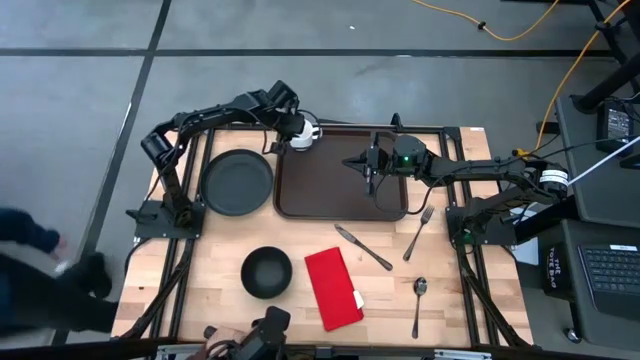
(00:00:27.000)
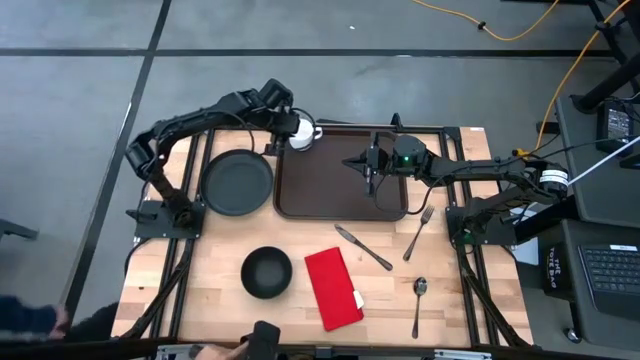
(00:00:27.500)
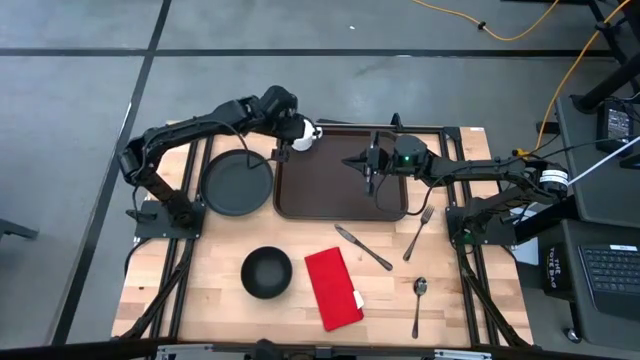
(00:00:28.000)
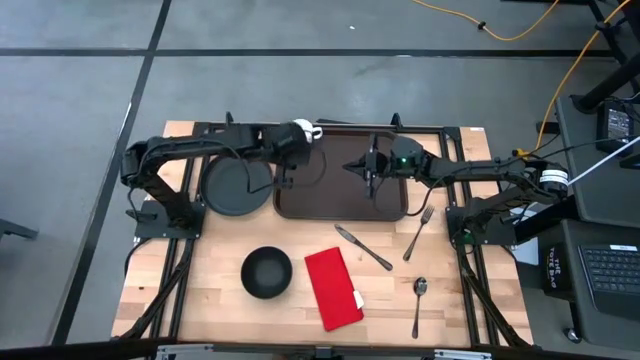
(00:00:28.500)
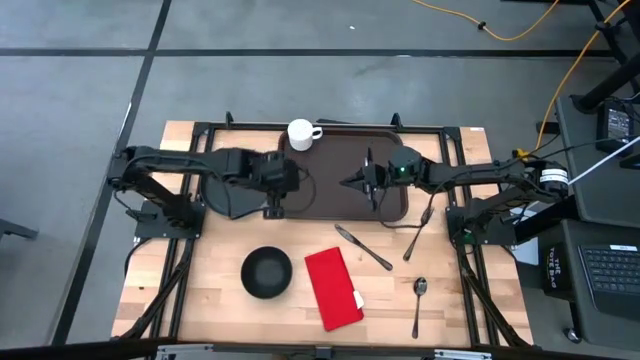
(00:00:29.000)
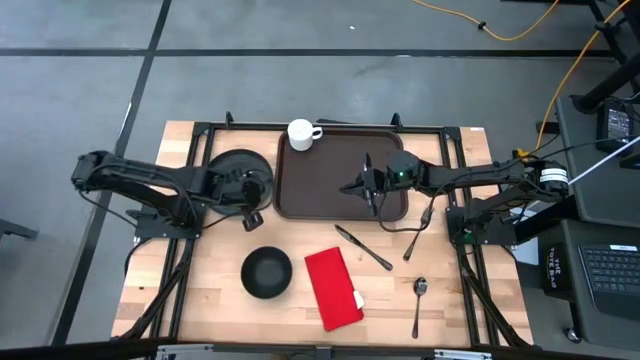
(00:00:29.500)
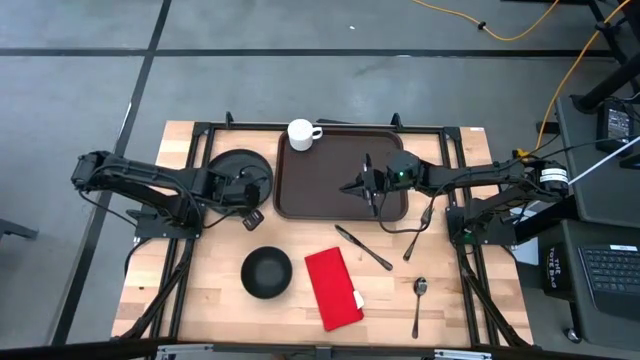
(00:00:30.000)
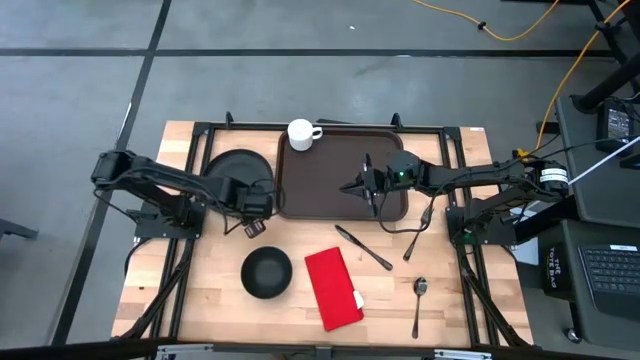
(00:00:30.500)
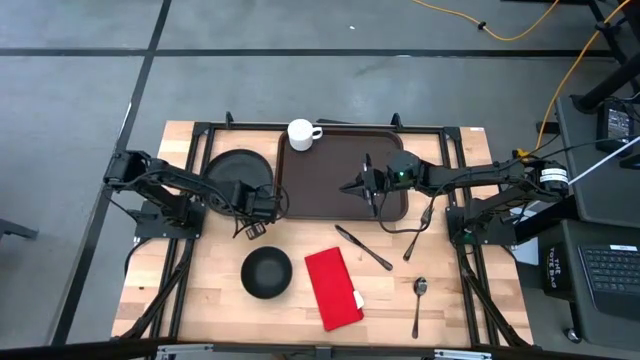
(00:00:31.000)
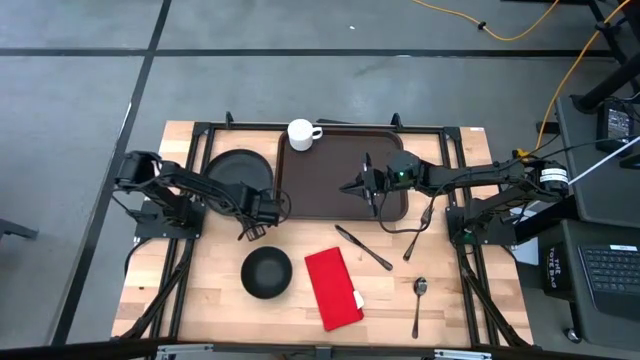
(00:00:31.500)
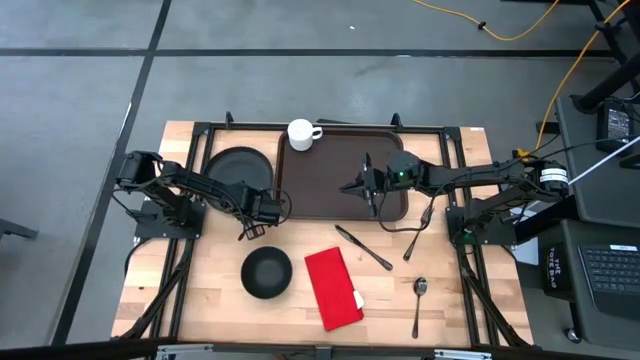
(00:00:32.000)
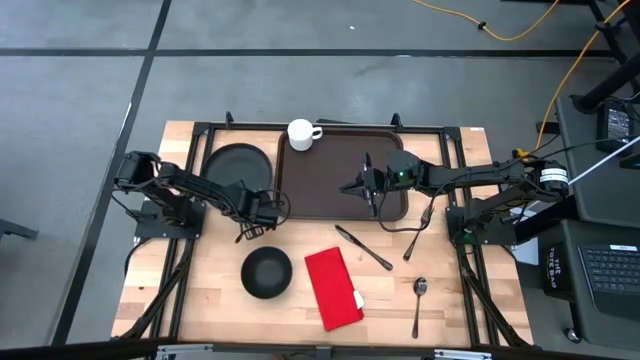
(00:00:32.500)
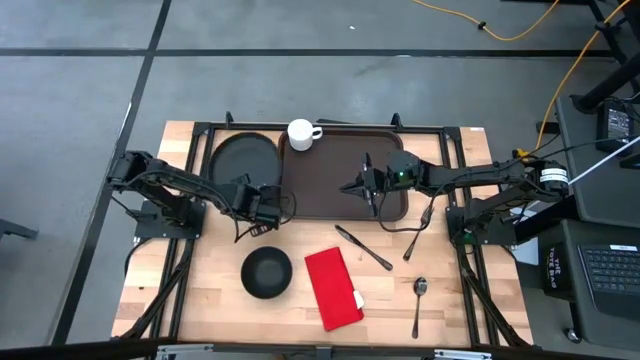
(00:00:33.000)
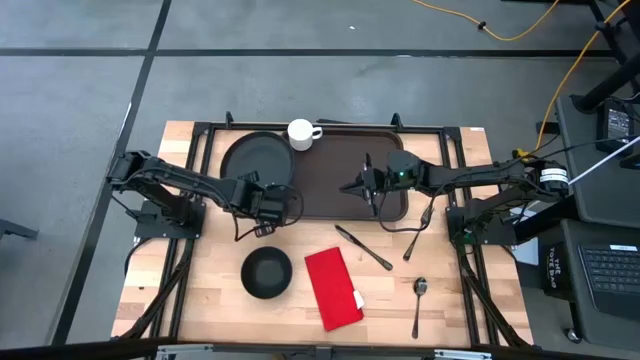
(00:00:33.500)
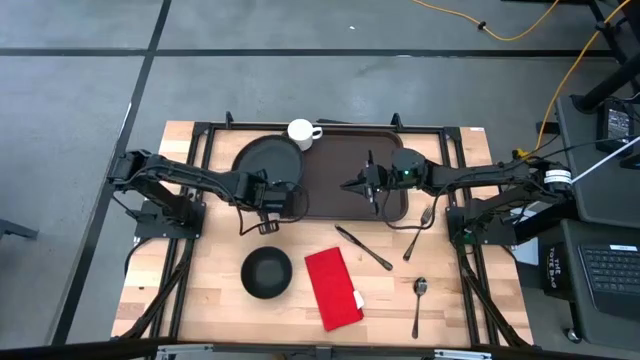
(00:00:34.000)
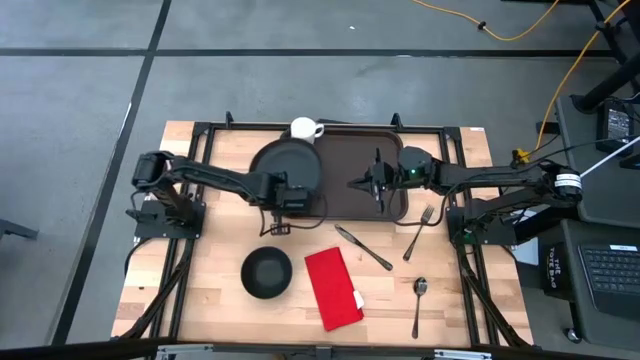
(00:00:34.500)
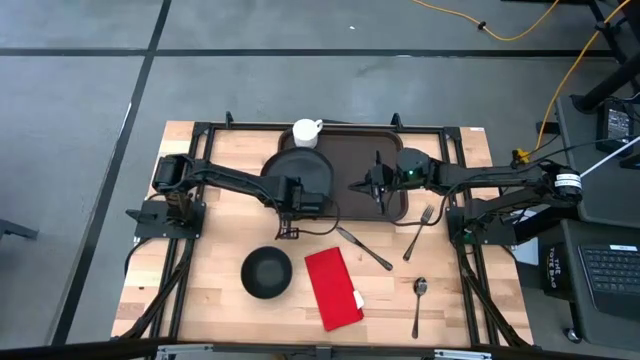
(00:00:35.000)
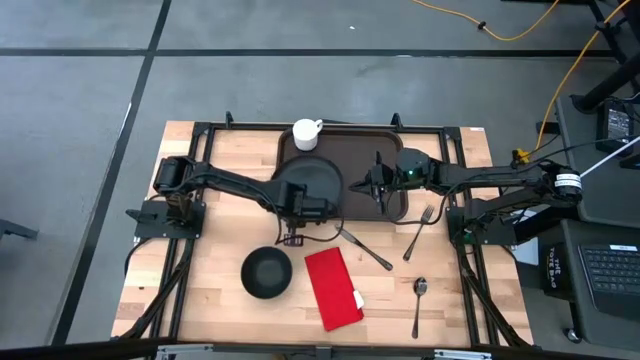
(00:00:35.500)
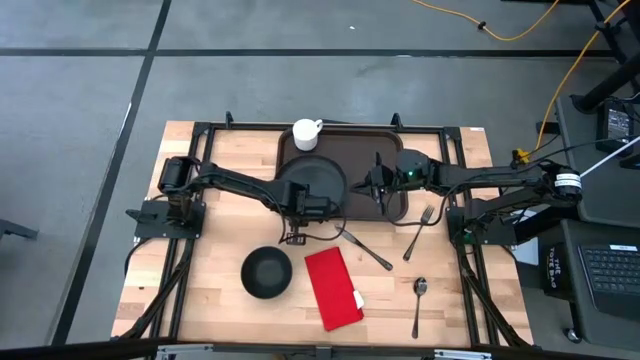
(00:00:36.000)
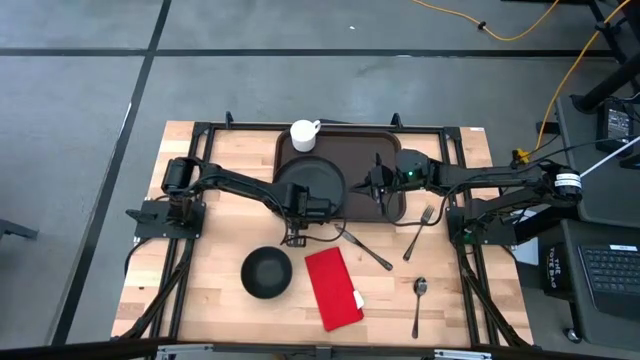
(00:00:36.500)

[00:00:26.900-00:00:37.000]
Task: Set up tray
Put the black plate on the left side of the brown serving tray

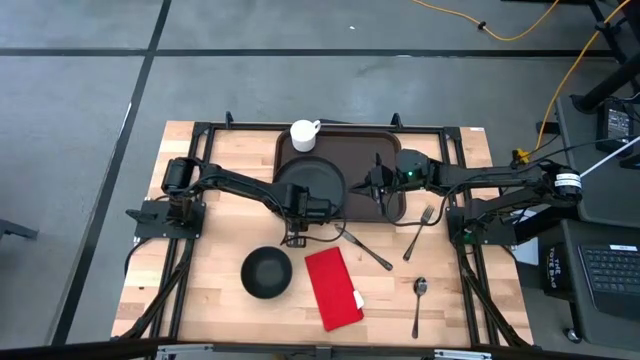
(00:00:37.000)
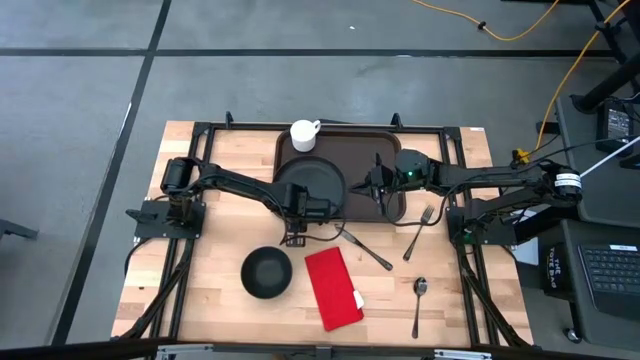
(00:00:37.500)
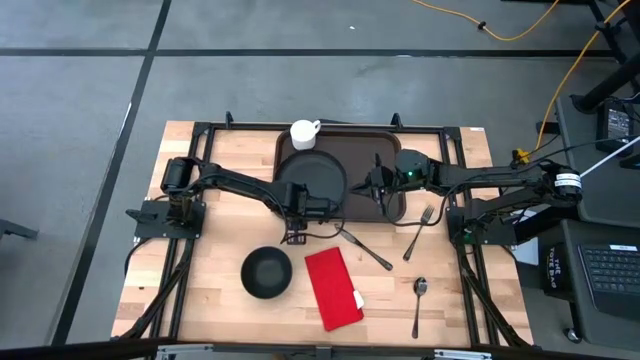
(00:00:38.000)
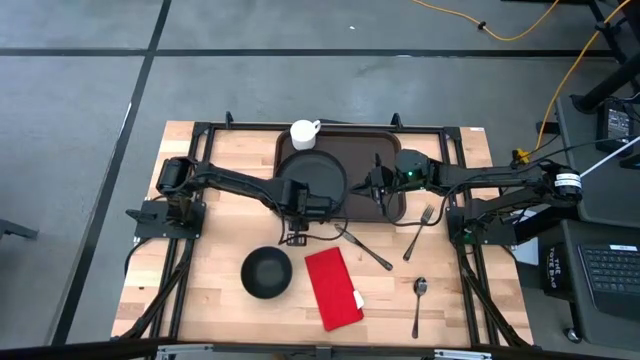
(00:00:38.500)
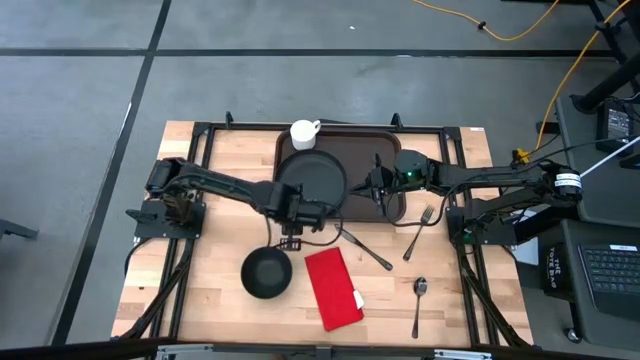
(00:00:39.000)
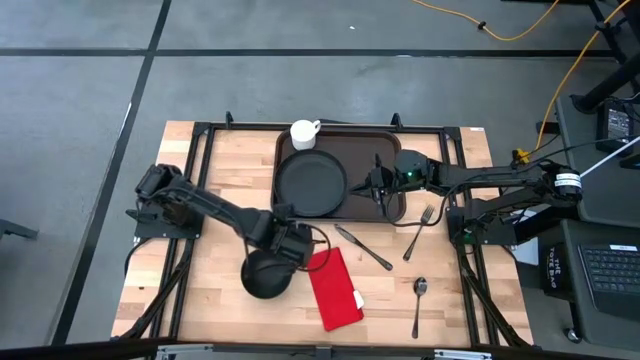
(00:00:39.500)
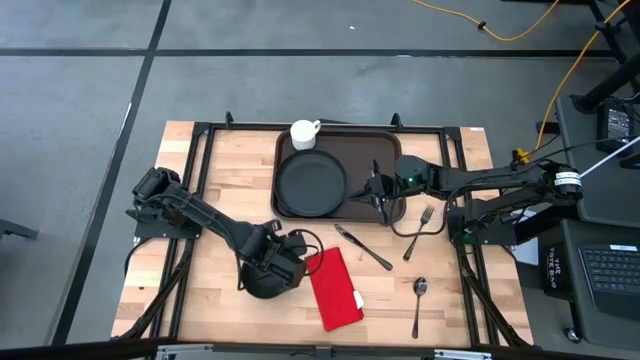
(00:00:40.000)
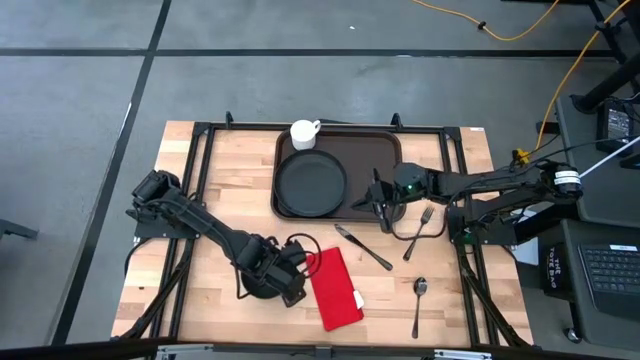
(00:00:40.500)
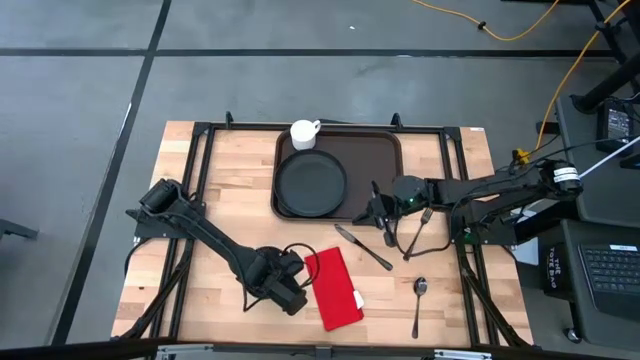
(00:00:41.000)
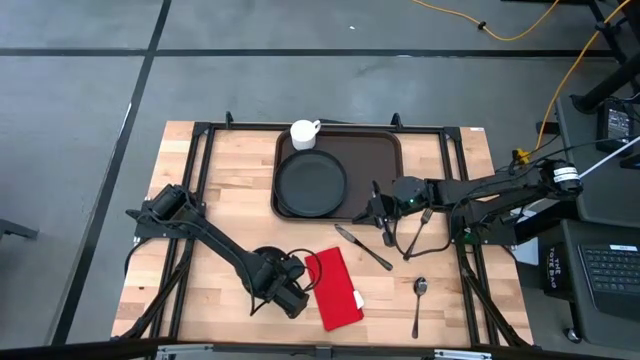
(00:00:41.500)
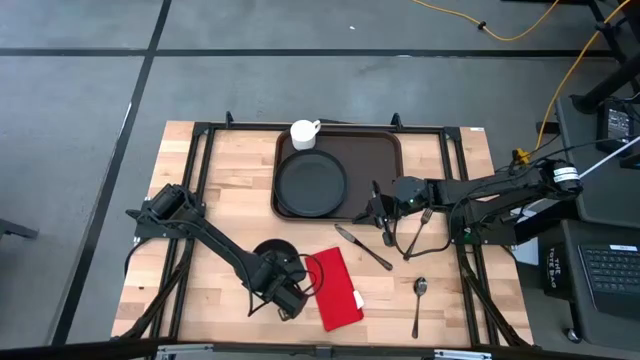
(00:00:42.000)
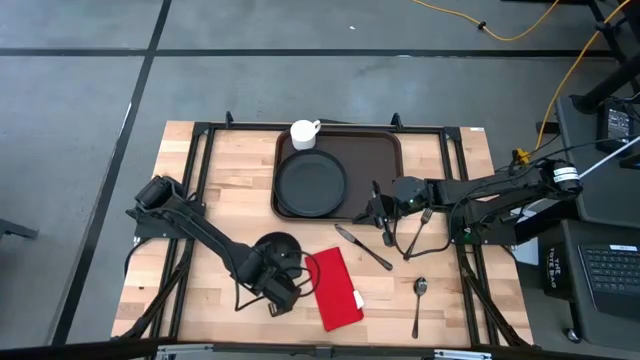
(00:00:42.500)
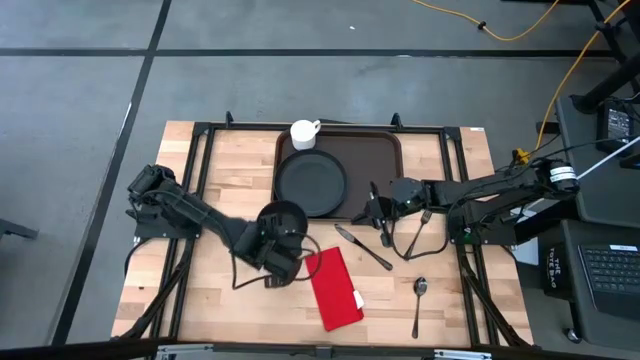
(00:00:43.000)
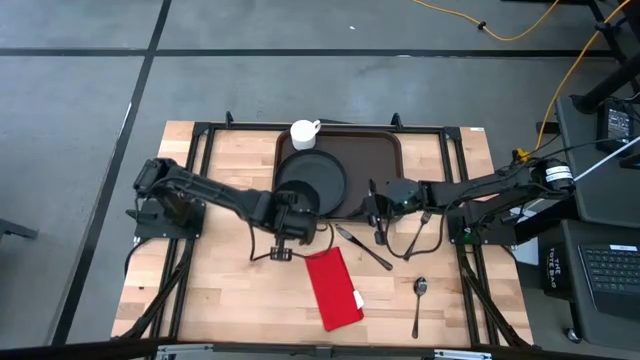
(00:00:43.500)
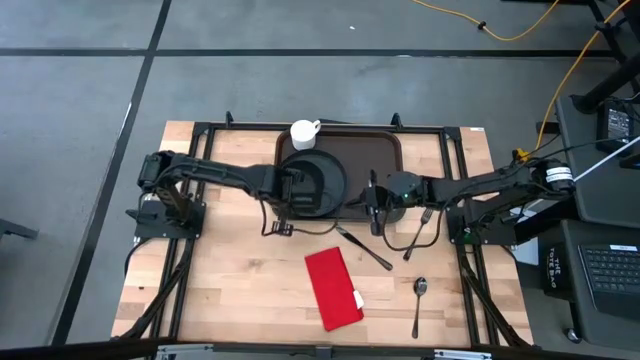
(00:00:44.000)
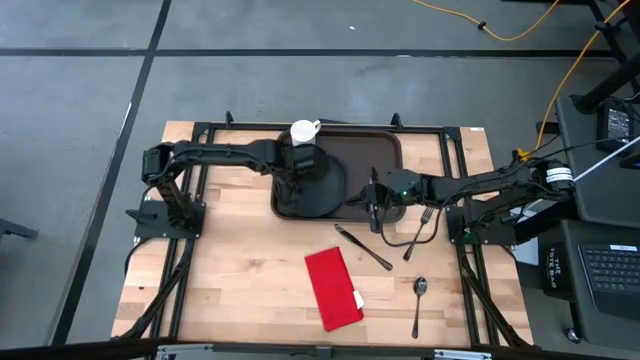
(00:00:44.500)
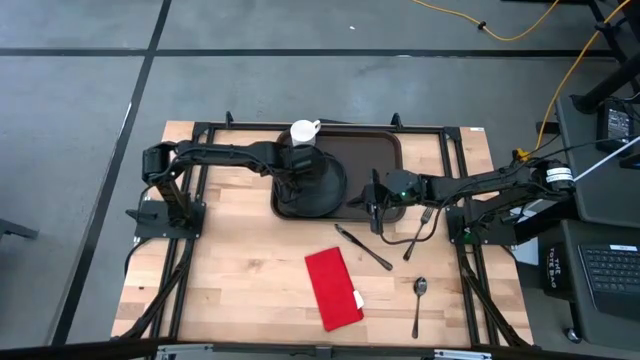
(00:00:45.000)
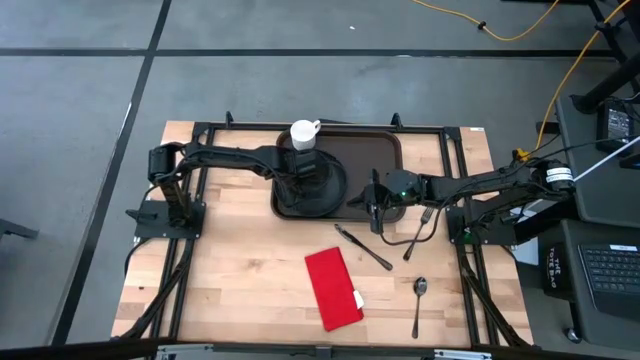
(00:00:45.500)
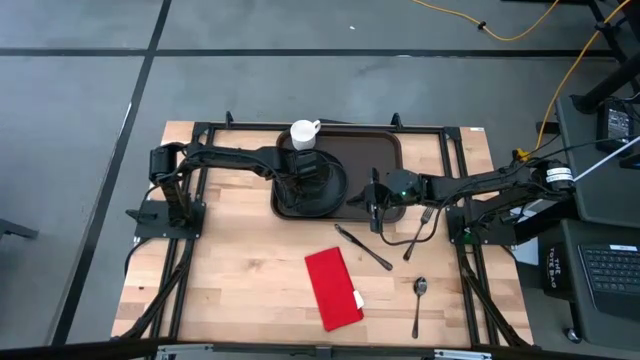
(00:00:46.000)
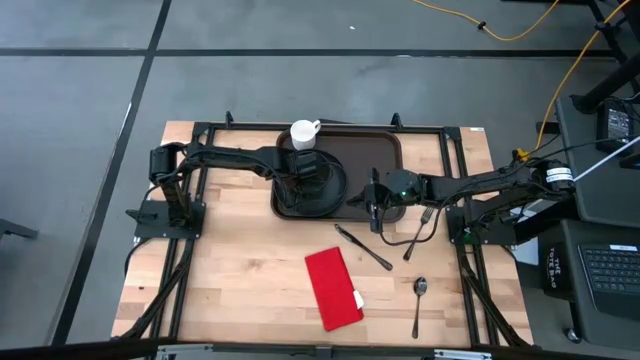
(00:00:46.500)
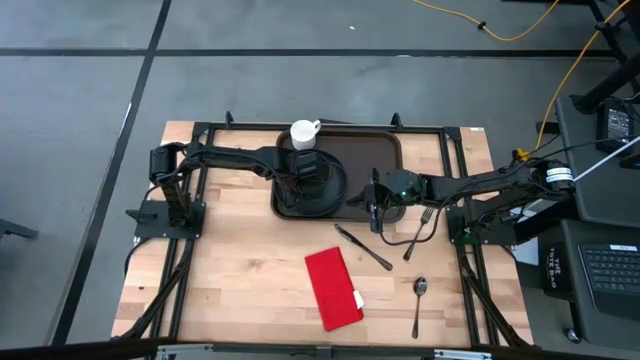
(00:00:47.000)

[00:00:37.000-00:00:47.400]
Put the black bowl on top of the black plate

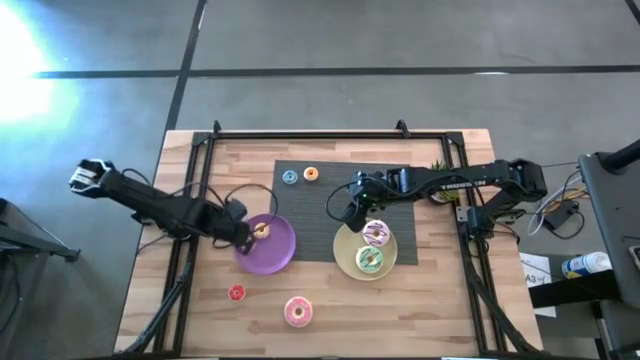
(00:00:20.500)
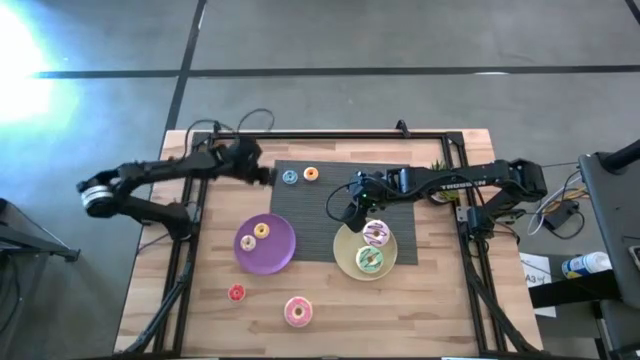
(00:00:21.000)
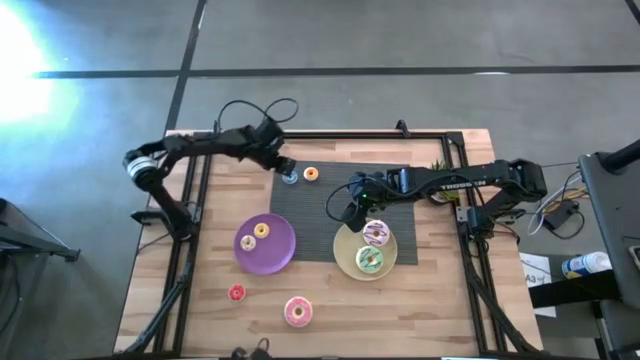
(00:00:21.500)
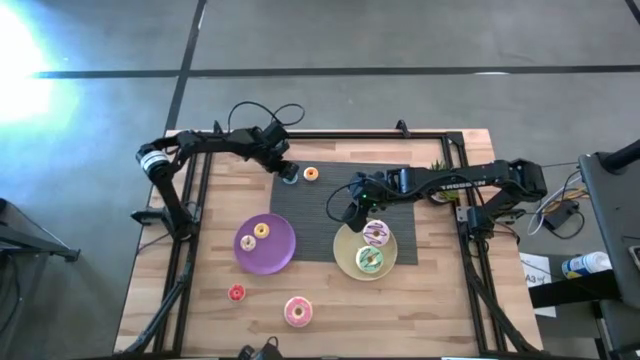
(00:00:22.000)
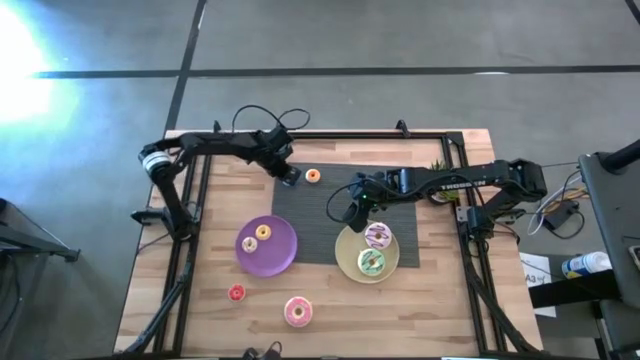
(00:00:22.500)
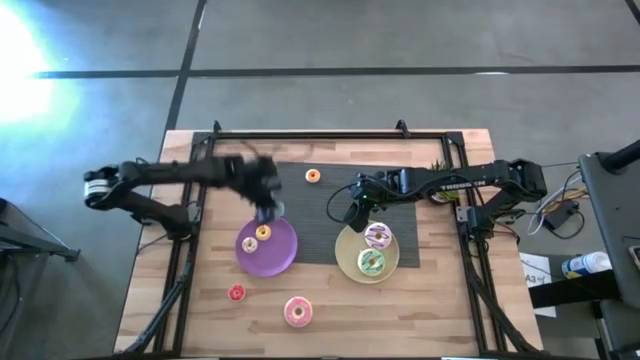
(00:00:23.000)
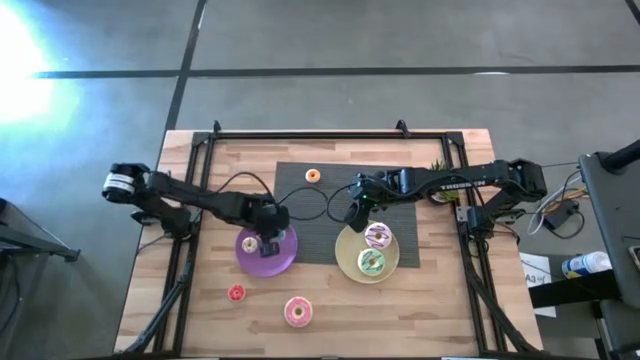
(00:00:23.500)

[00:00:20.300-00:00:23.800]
Task: Pick & Place donuts
Put the small blue donut on the purple plate
